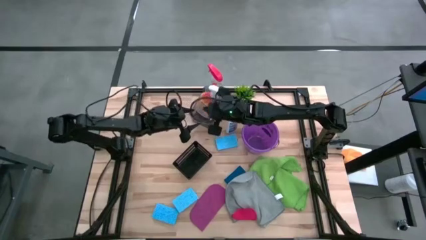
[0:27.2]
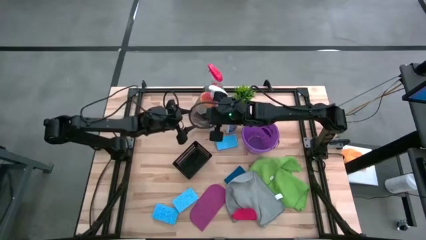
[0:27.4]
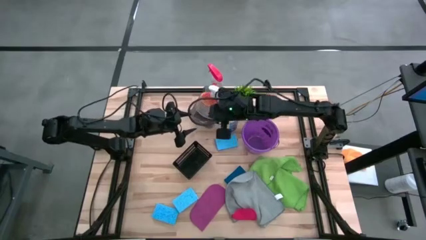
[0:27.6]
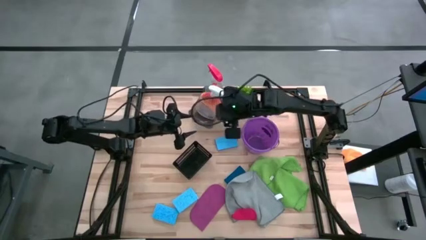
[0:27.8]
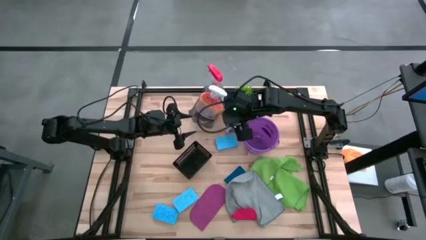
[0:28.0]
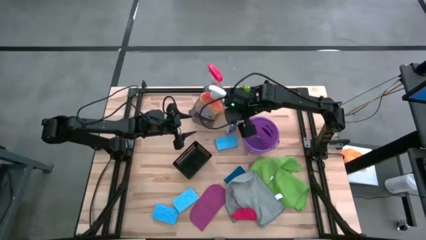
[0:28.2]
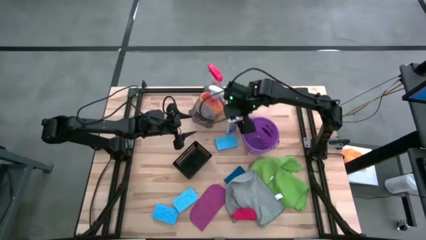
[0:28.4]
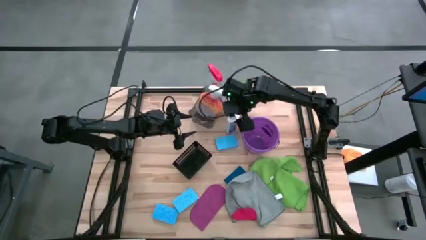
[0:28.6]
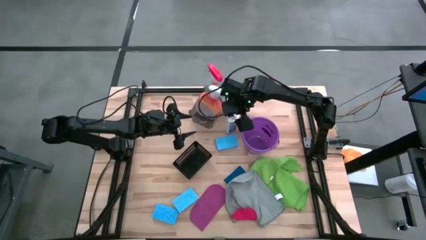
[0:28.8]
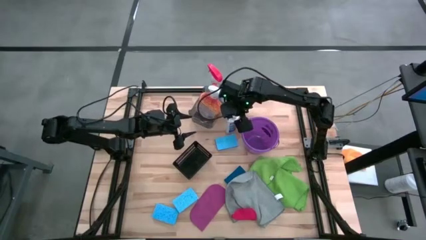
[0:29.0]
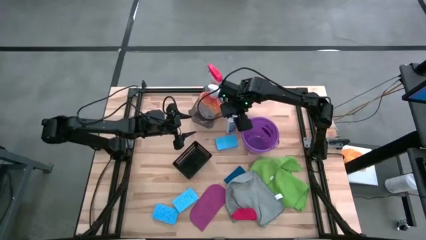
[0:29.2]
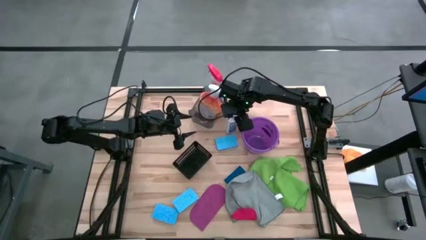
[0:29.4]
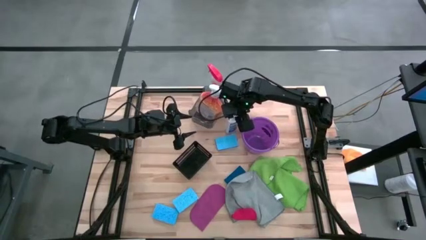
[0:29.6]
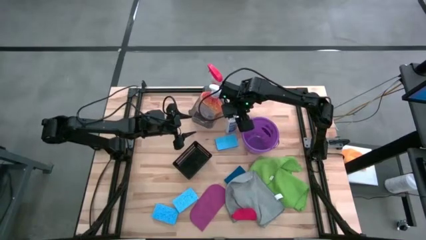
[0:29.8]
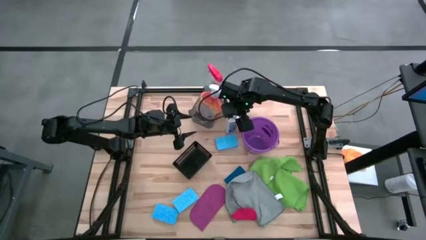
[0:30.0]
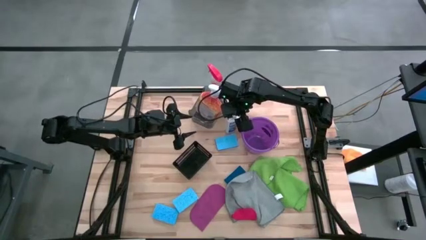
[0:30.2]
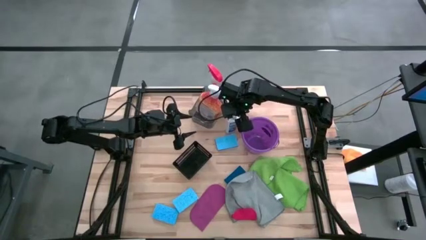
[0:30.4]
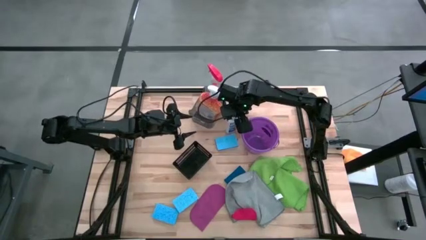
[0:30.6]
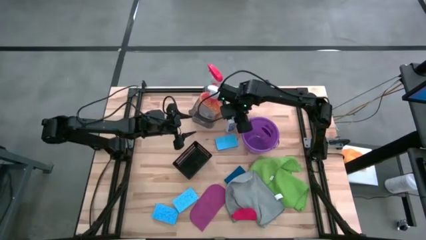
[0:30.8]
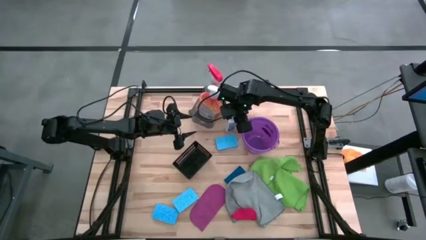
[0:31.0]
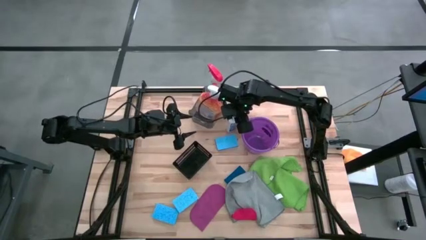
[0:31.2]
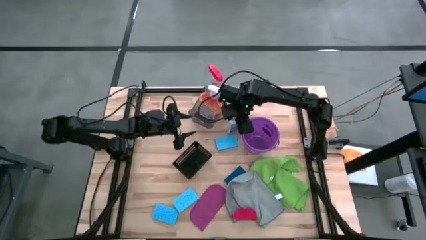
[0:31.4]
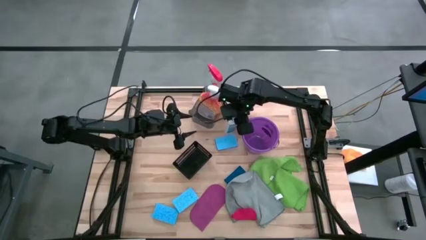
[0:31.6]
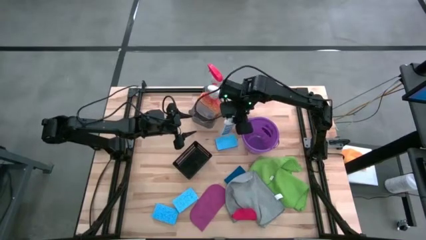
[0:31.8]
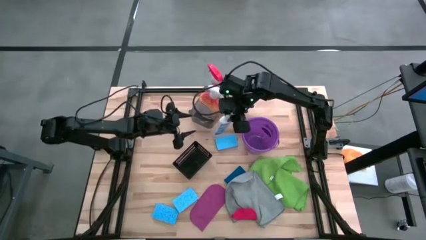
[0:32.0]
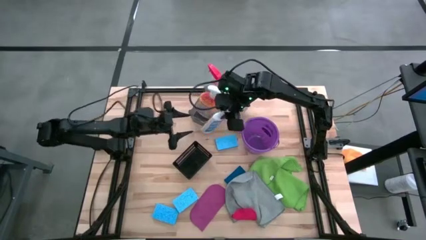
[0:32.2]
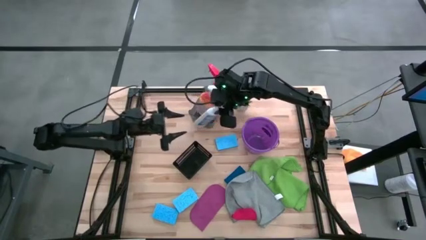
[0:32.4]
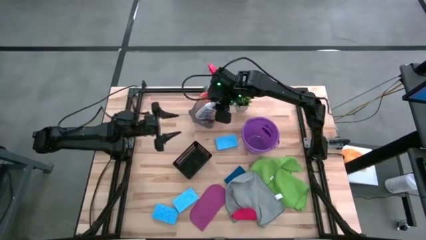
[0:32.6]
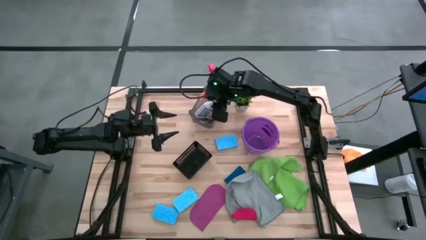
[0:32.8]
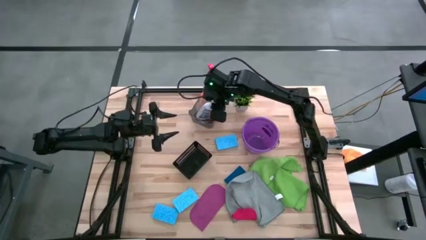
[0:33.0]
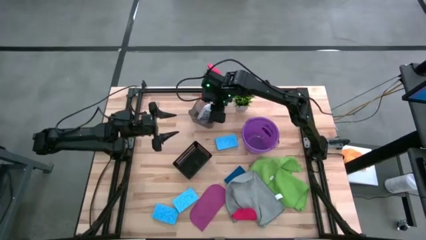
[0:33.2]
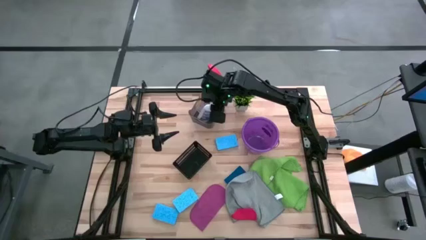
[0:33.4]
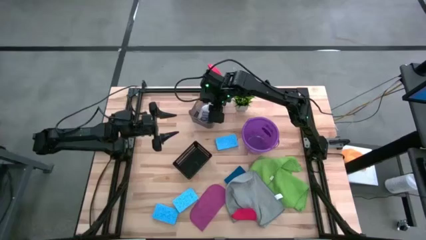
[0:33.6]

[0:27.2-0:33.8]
Task: Pick & Place Kitchen Items
Put the white plastic restorer bottle into the black bin

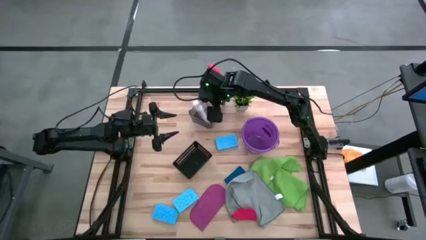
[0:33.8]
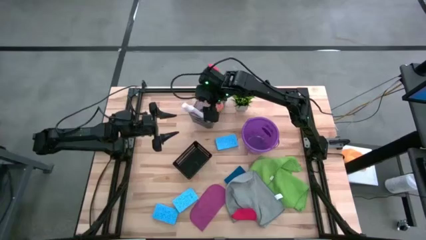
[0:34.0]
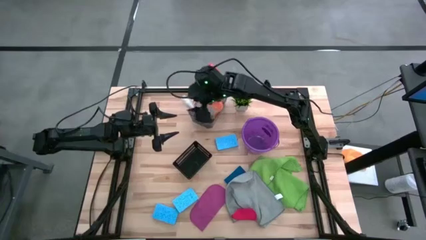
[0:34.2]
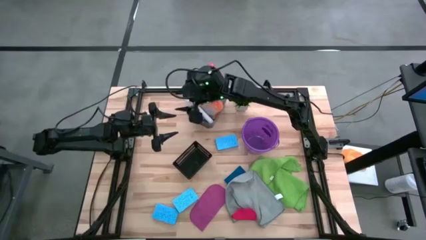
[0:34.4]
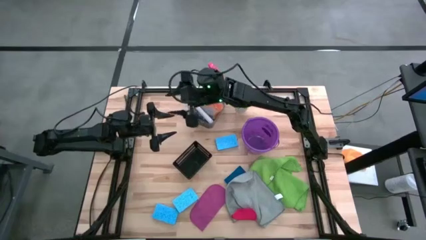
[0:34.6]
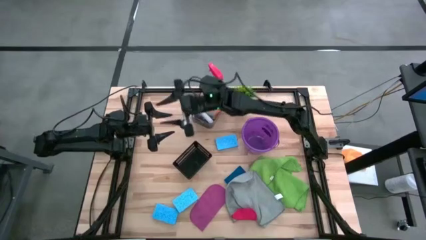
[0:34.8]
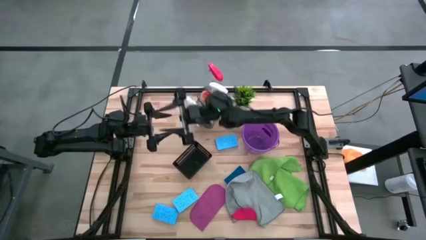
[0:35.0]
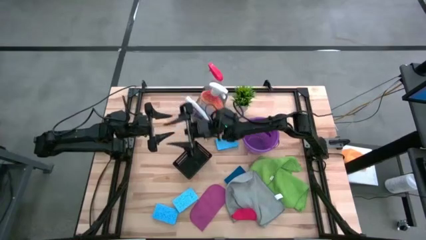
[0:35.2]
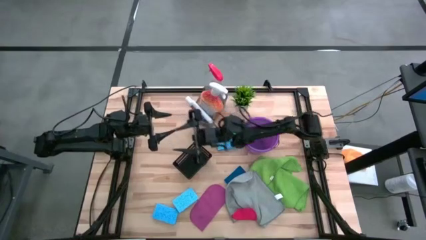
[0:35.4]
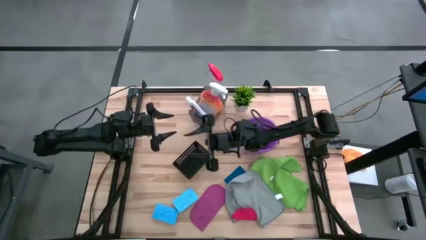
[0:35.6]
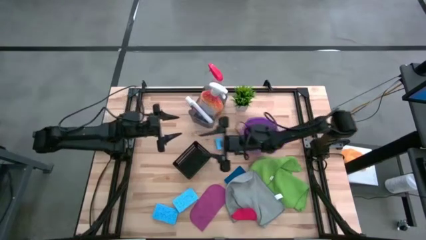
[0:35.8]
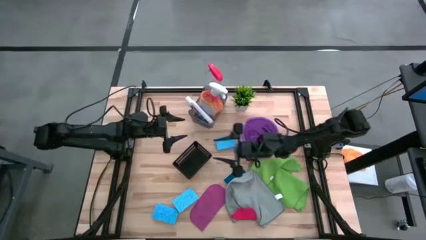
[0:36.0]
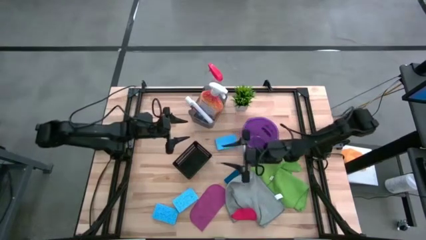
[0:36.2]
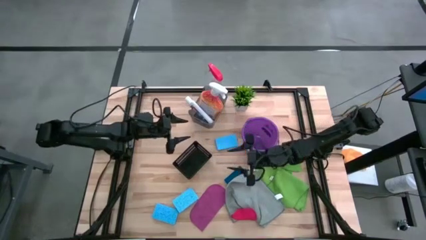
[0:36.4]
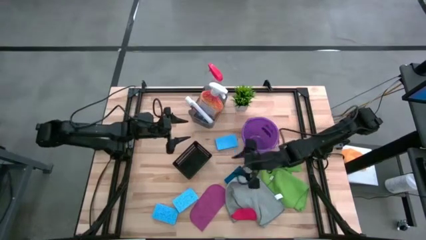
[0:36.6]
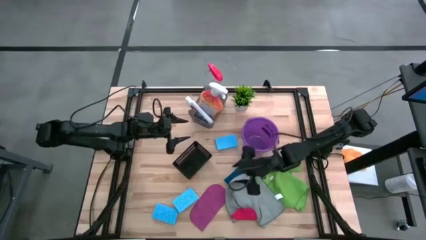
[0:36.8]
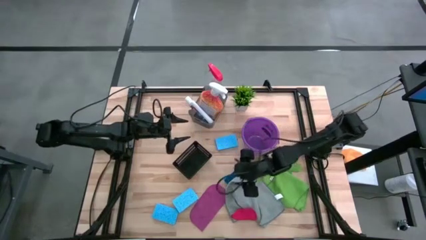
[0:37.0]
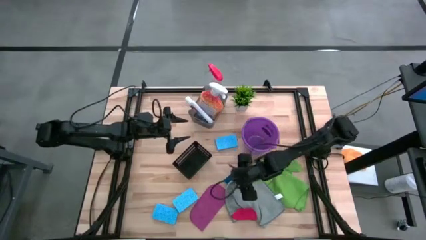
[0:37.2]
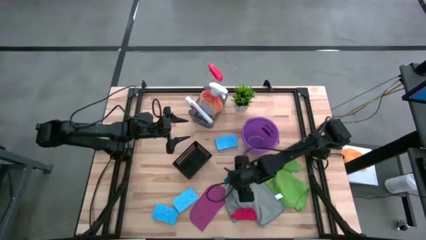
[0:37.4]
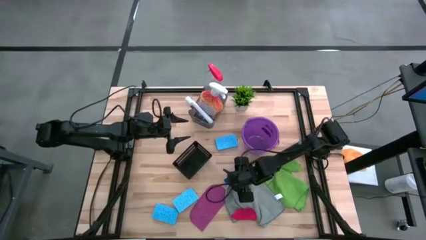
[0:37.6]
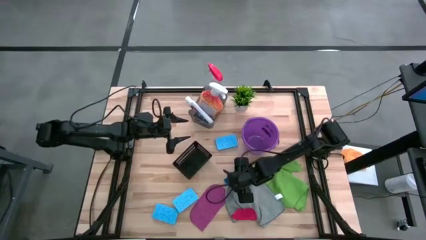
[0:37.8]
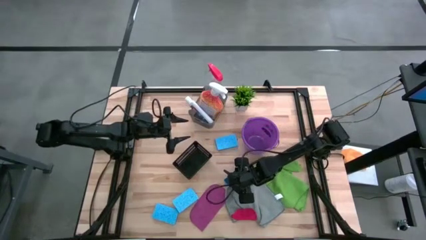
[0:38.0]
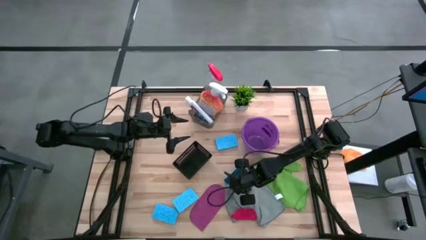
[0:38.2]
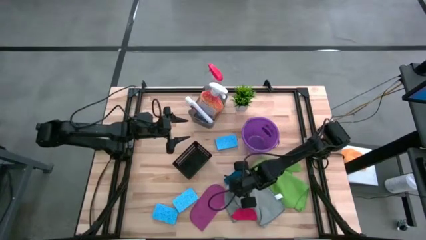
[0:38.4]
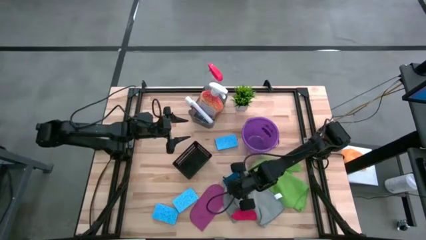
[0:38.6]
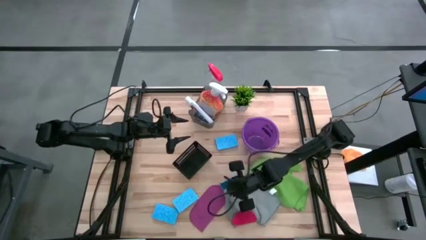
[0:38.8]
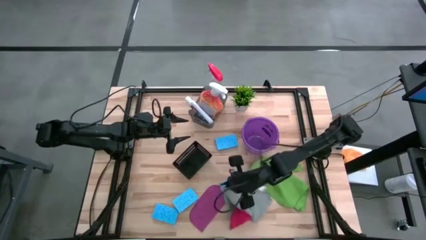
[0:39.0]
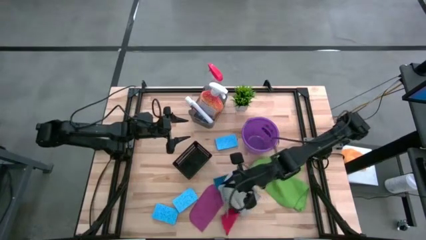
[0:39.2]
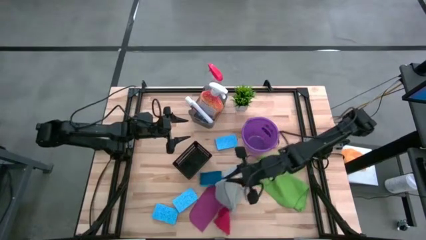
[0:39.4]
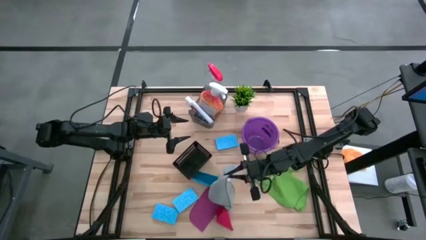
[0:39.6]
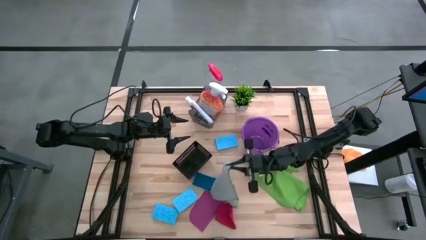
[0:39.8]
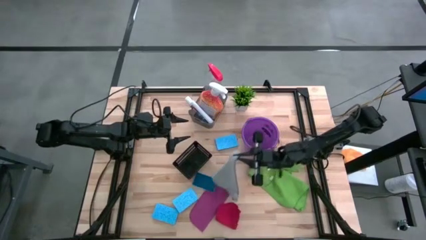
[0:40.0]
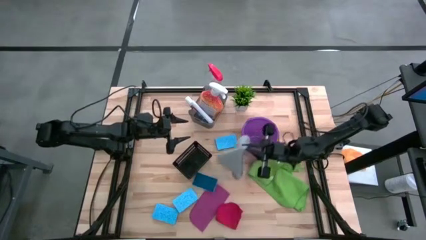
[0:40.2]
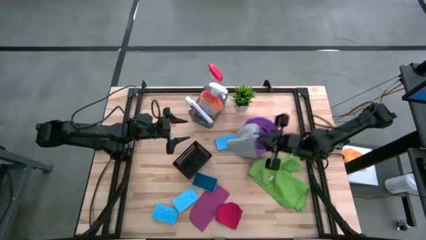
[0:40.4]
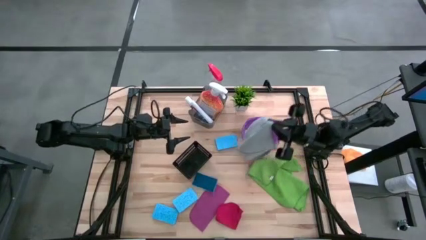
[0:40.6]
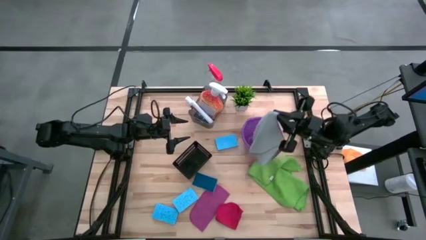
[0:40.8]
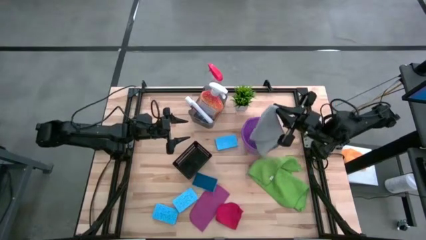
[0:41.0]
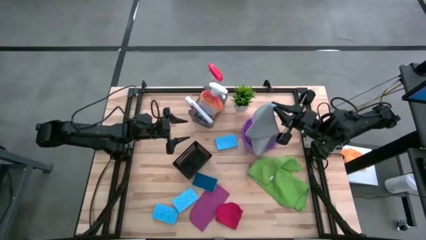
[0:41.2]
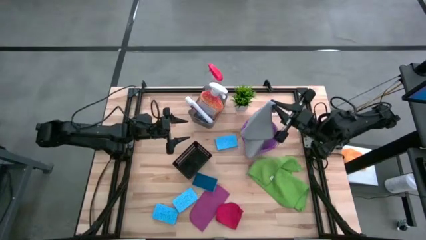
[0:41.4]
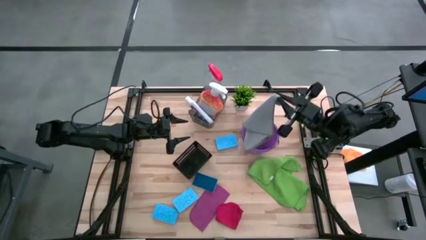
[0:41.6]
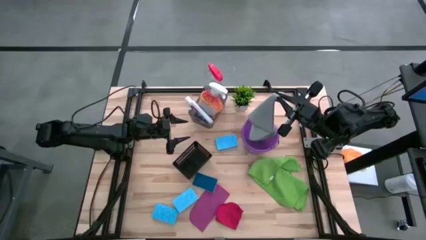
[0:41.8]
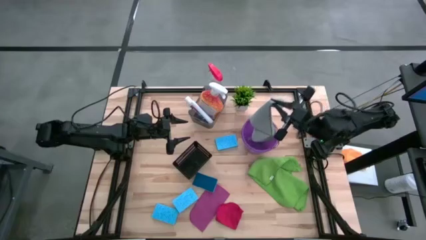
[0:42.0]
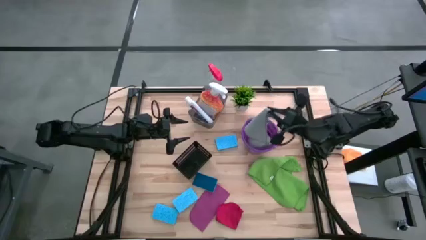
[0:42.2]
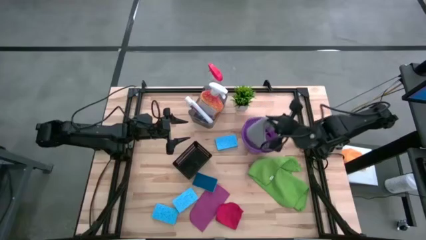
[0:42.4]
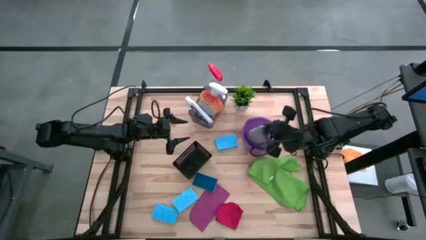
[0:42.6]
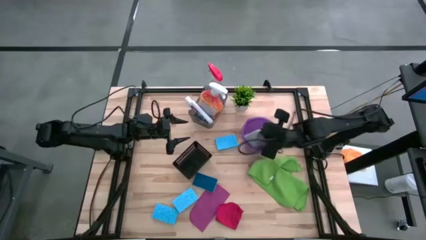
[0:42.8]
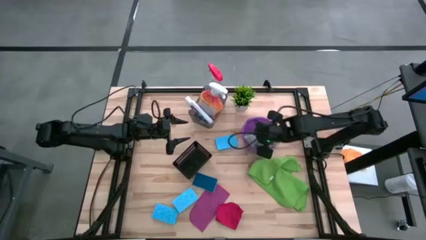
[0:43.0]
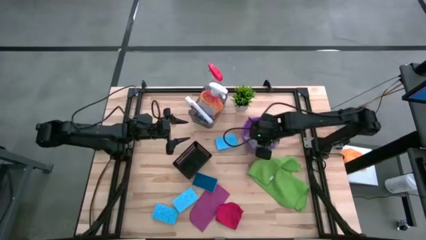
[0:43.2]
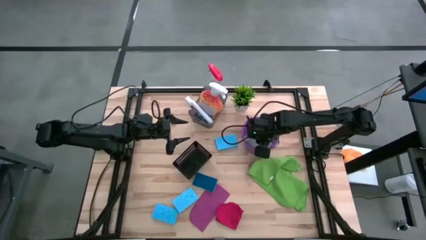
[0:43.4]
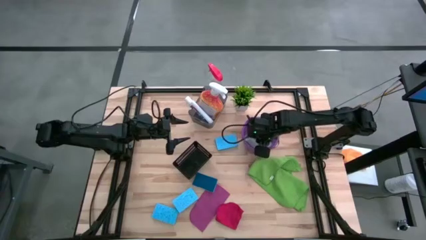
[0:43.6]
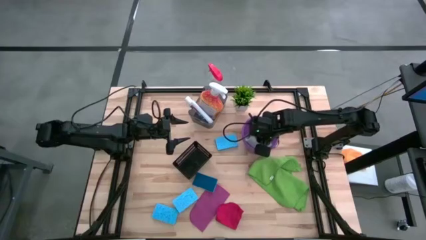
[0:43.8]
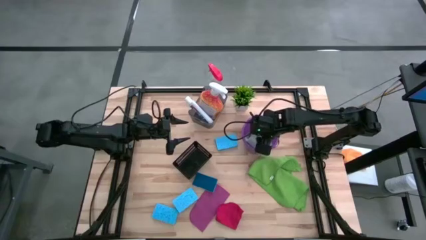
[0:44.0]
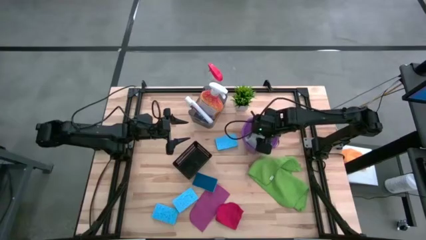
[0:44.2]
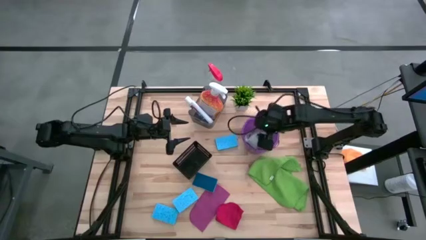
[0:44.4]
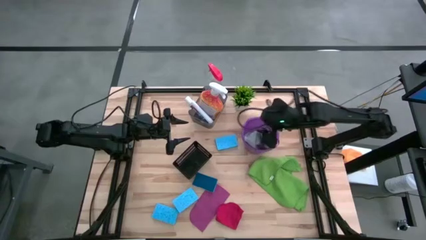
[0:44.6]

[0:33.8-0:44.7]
Put the gray microfiber cloth into the violet bucket
